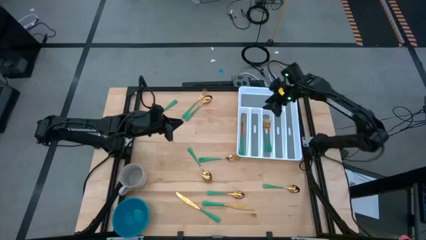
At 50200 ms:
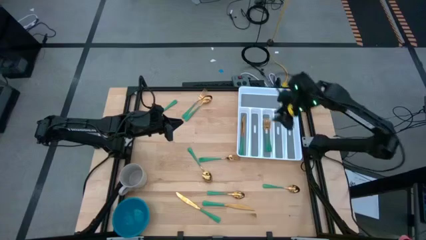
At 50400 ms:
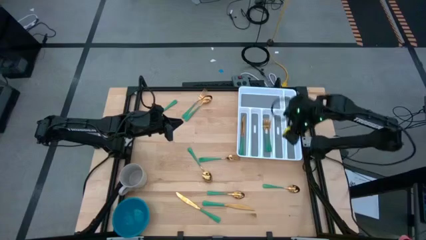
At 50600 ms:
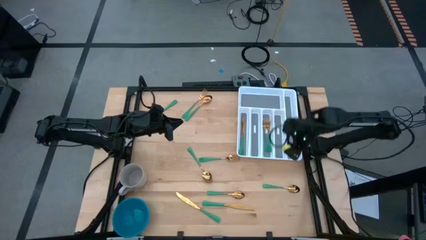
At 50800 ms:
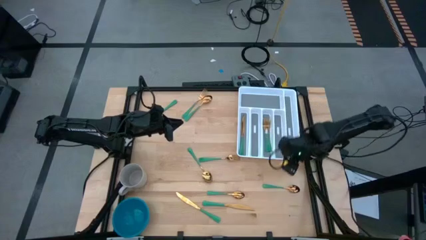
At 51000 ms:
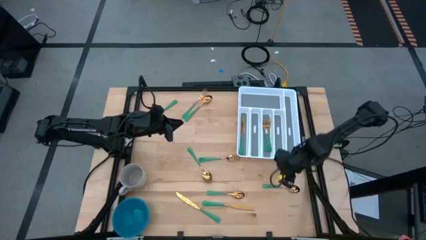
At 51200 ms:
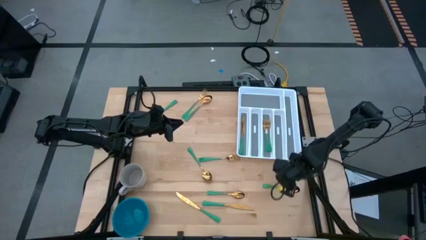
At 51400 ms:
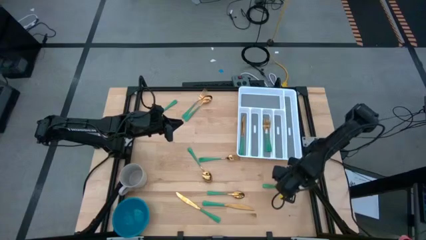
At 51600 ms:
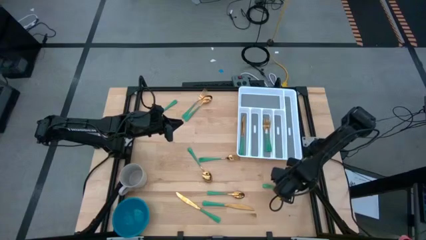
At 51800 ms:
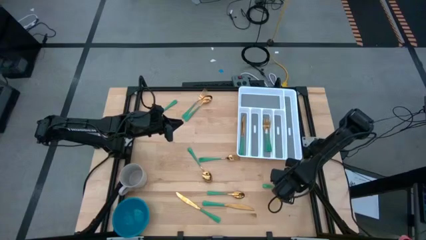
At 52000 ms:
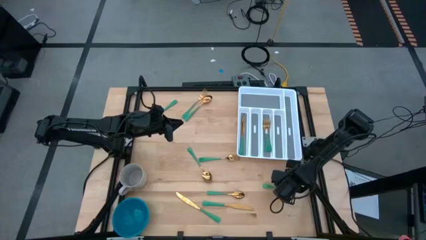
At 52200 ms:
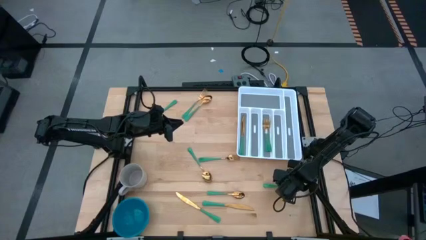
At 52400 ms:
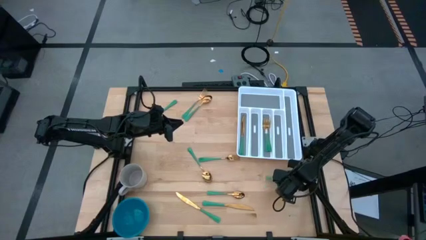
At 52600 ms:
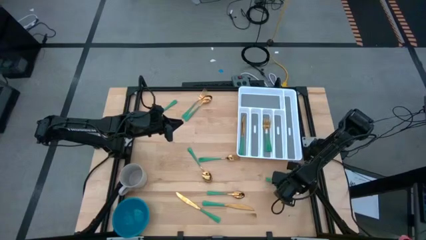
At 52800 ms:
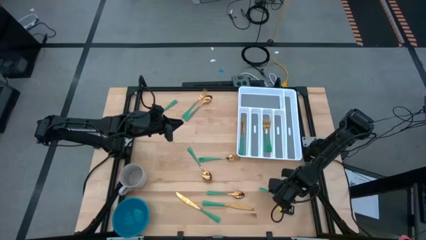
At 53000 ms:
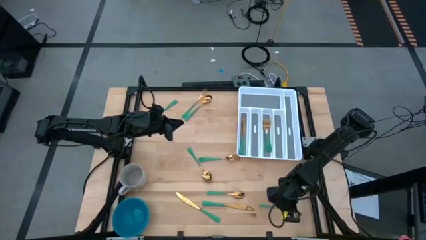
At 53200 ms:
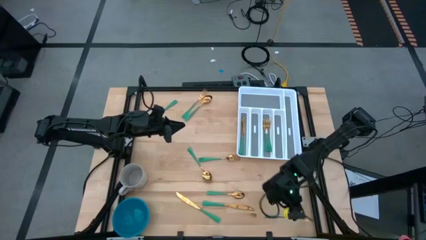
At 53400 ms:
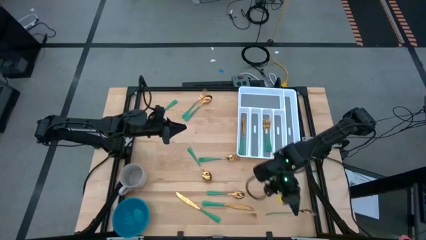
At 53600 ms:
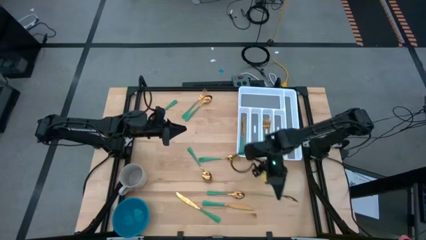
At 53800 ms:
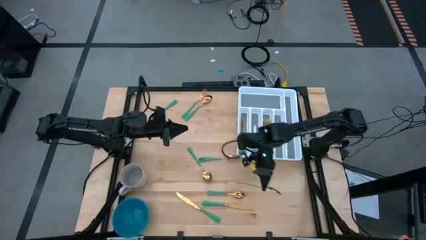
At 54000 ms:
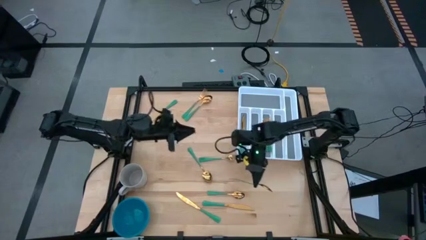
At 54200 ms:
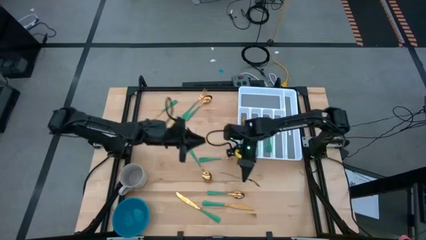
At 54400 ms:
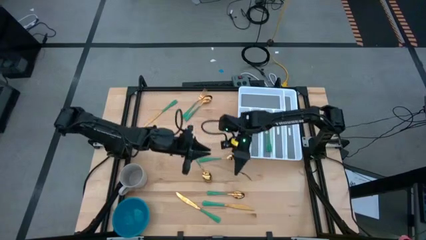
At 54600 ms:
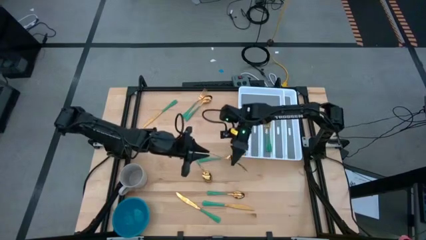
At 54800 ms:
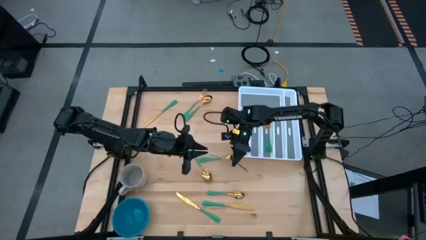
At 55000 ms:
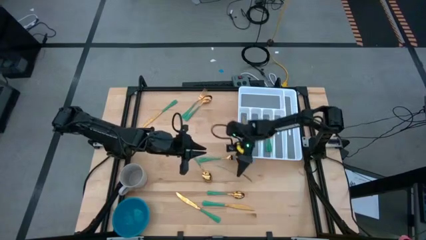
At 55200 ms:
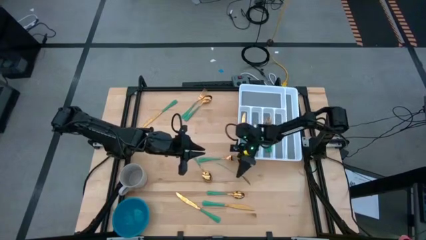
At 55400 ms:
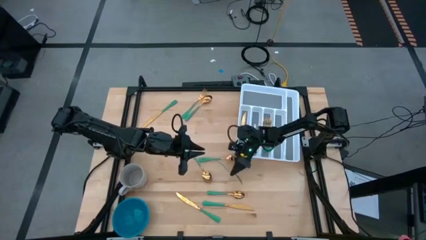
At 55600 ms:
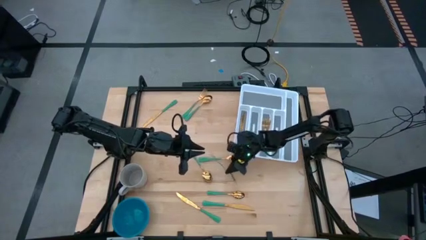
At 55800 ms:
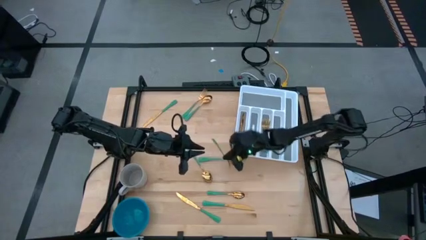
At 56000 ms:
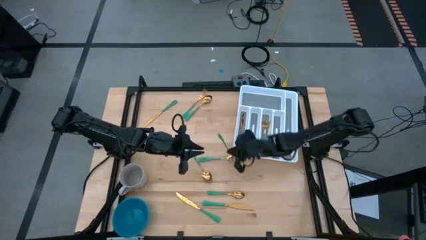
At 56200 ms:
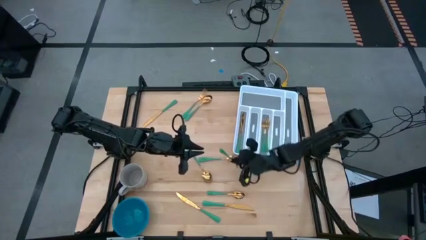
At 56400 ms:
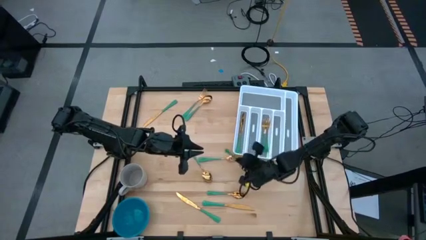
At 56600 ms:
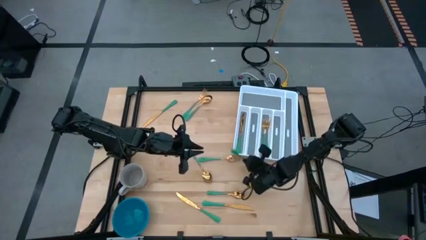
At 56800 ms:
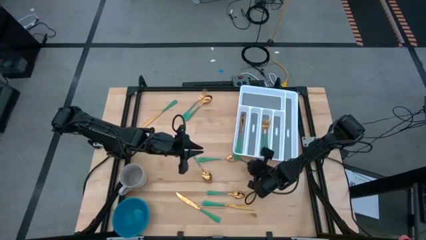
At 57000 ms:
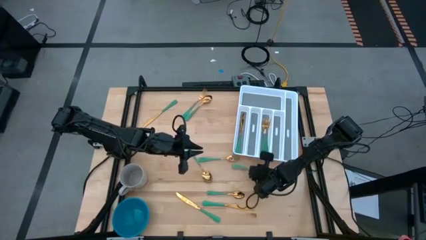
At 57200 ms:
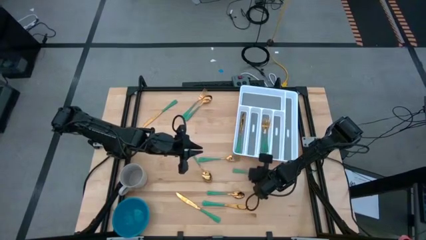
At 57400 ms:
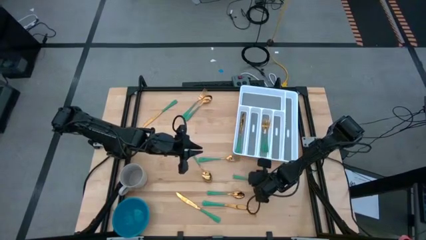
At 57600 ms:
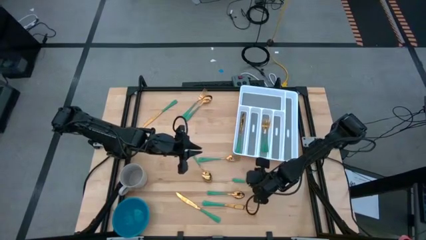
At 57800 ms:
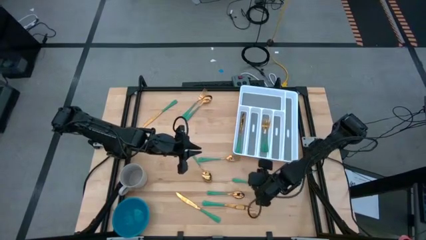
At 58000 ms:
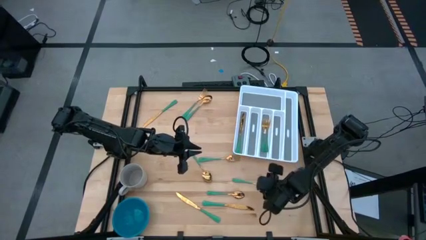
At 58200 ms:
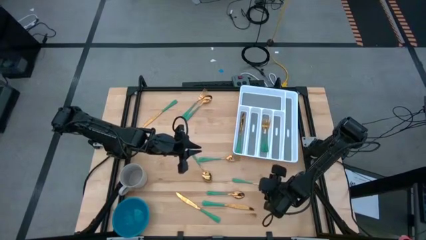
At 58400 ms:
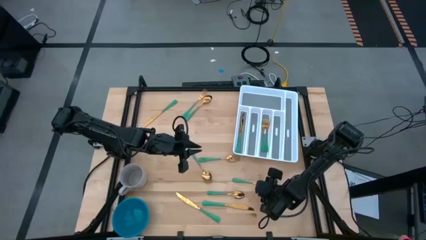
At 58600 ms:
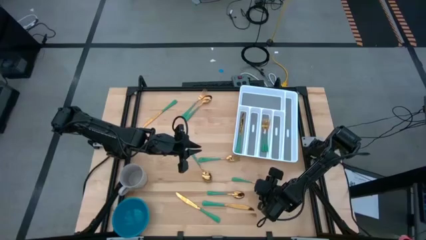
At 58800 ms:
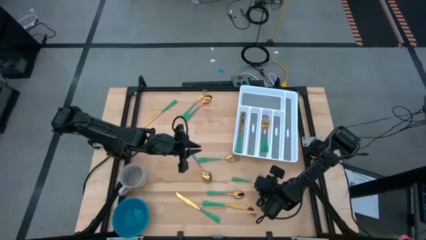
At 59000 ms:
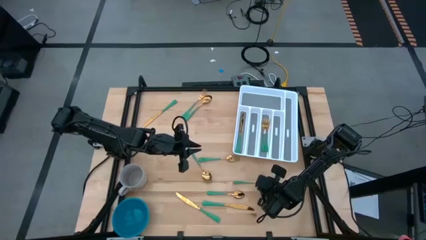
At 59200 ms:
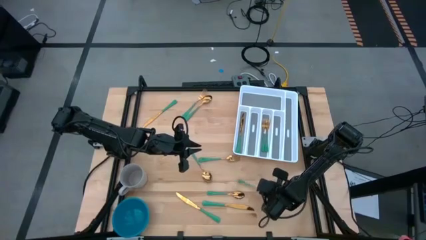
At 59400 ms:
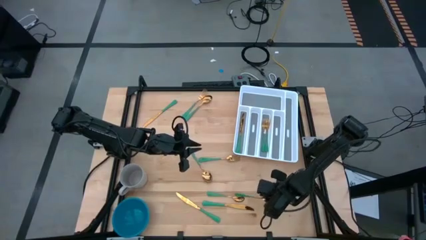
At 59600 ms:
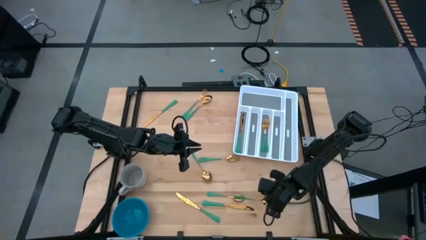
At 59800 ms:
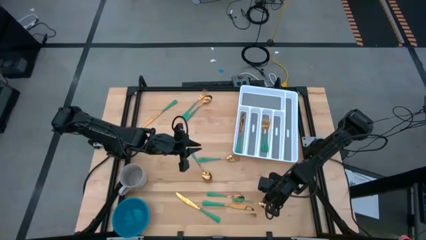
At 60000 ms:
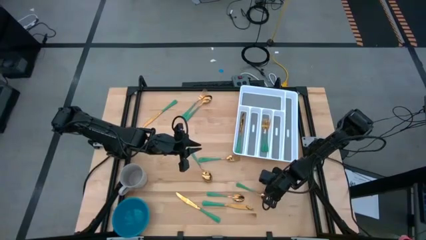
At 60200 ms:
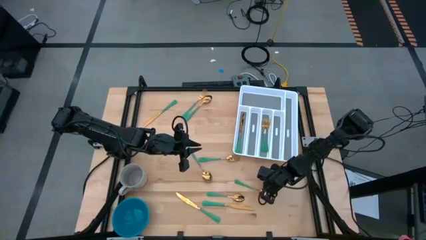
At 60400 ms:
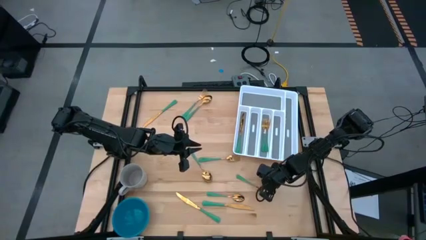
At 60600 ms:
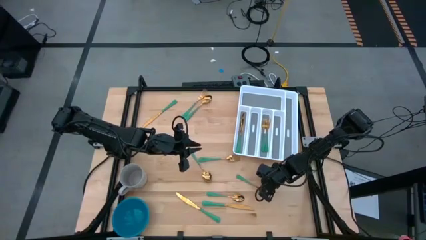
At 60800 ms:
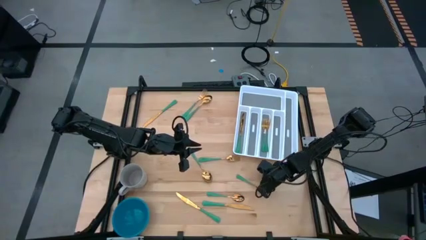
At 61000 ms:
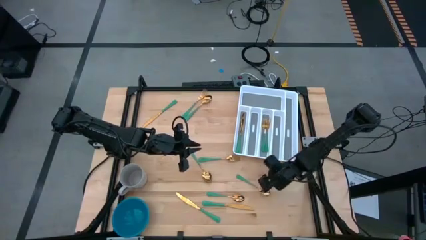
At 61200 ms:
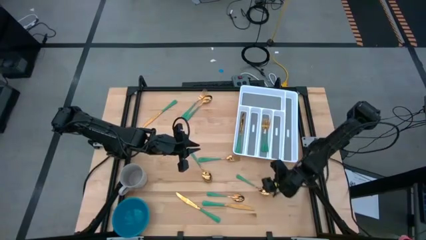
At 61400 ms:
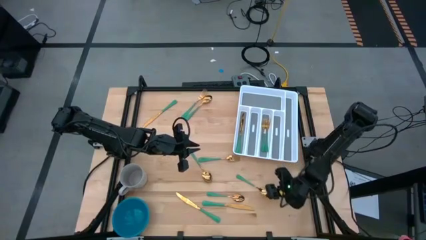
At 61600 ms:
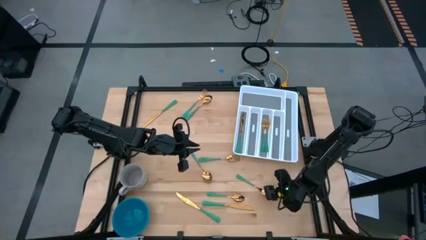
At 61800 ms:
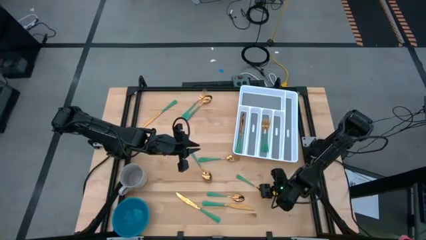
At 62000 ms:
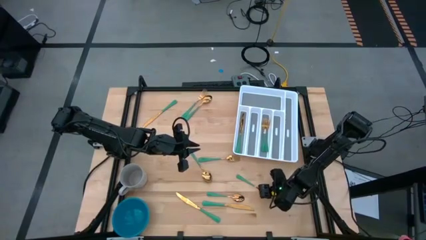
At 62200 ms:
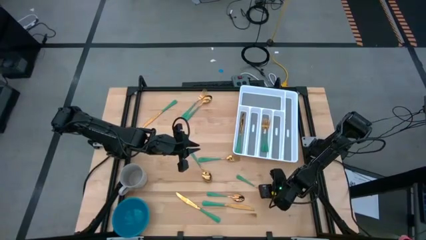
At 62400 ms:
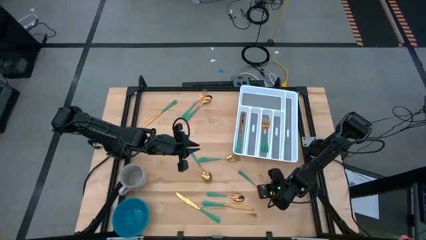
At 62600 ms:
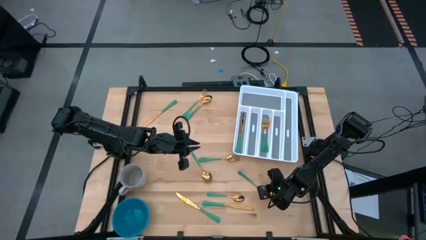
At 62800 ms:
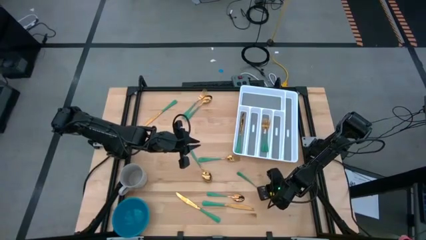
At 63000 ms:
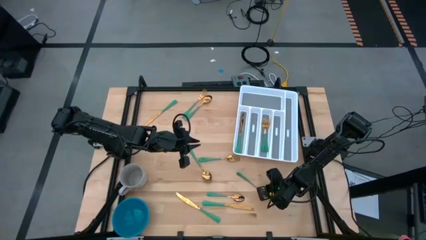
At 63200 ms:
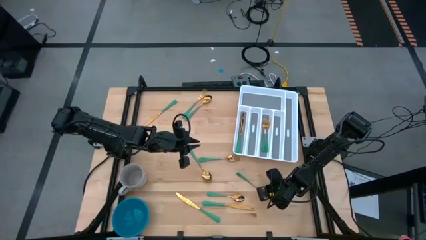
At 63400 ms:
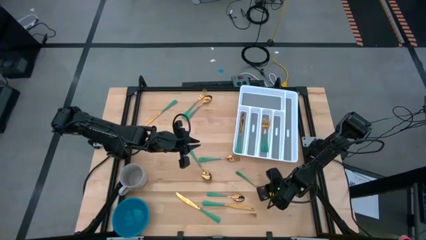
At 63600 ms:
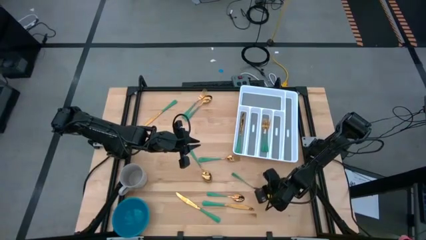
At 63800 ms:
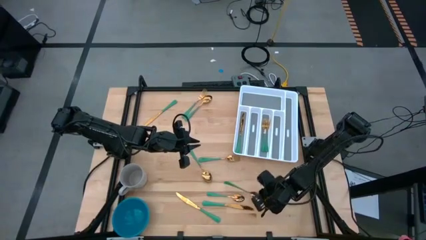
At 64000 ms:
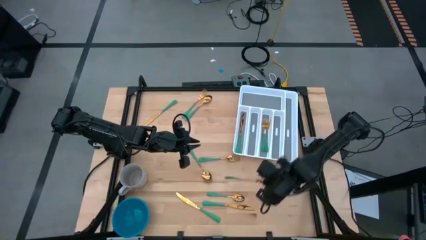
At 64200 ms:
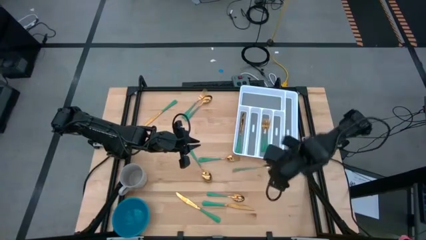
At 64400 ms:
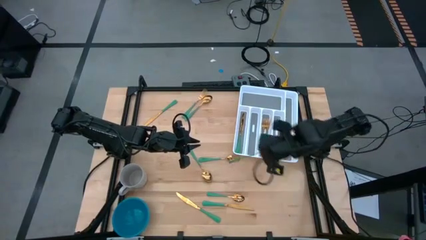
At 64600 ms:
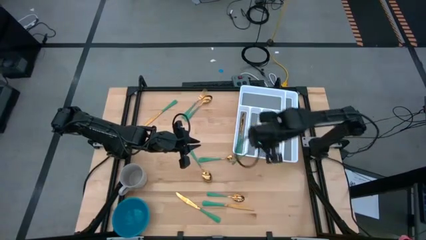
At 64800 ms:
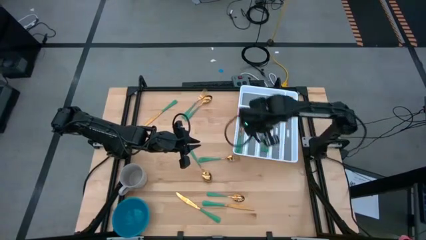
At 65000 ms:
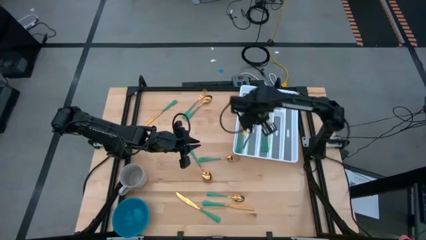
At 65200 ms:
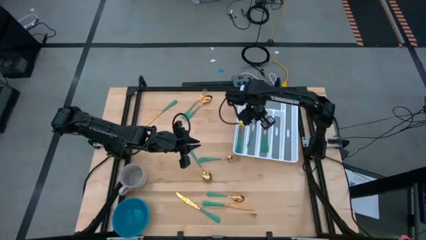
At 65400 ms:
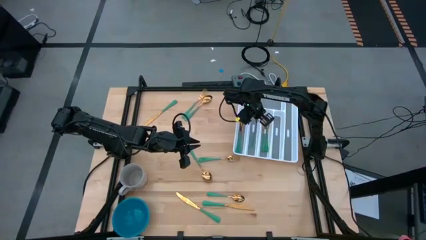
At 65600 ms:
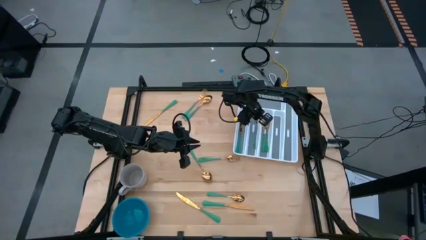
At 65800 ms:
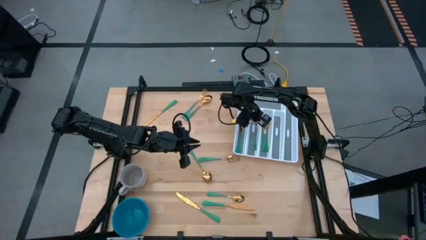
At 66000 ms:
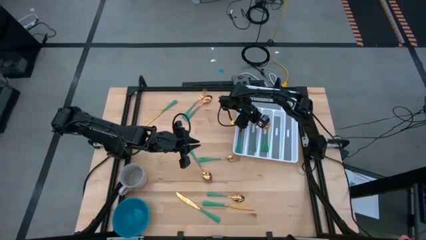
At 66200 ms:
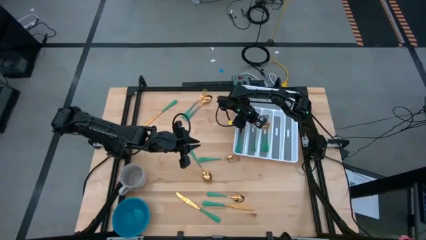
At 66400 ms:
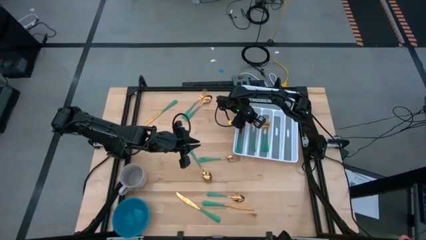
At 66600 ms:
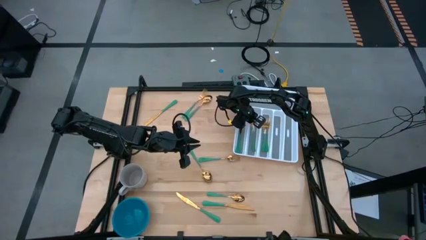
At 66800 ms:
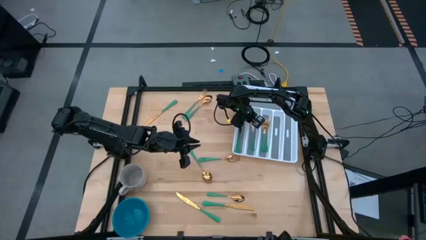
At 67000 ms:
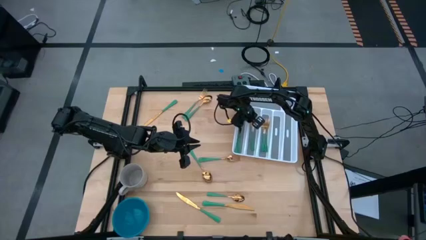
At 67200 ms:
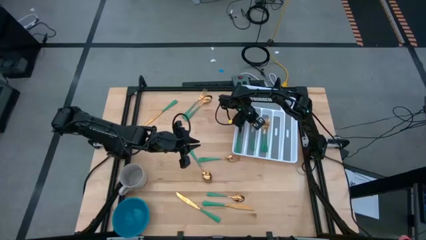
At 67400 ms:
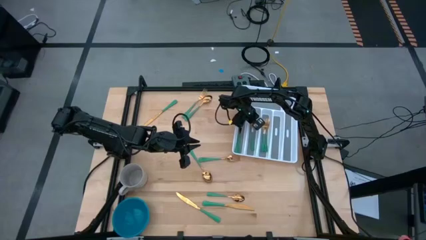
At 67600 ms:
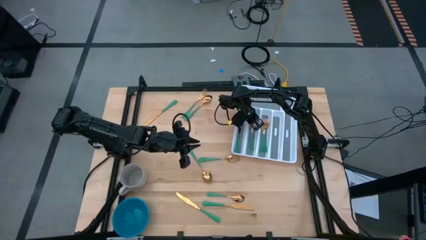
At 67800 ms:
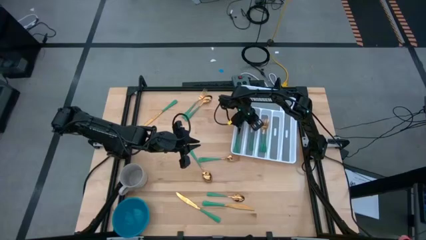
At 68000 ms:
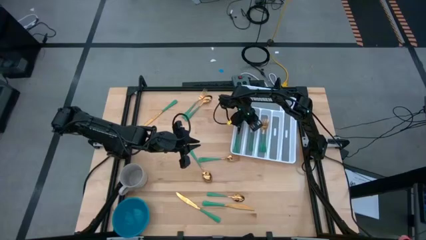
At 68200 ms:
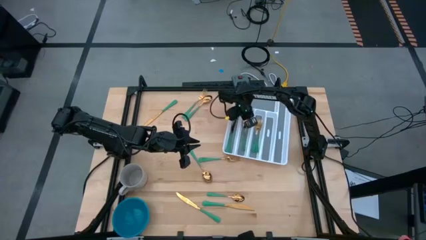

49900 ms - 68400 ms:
Task: Sort silverware
Put the bottom right green spoon into the white cutlery tray
